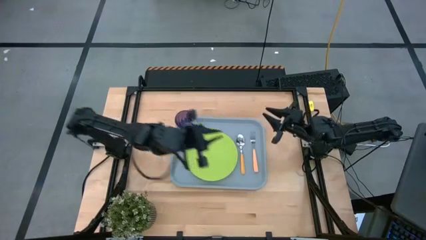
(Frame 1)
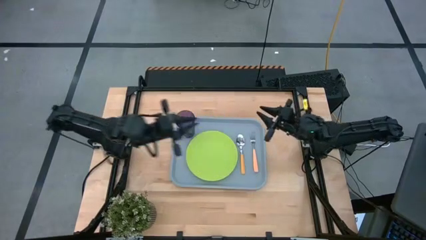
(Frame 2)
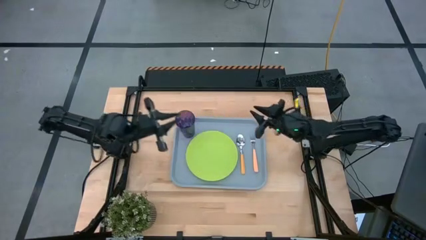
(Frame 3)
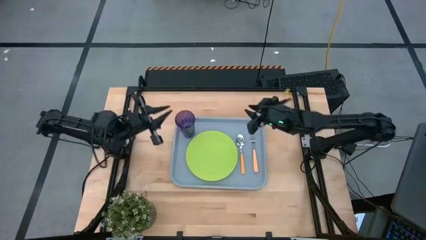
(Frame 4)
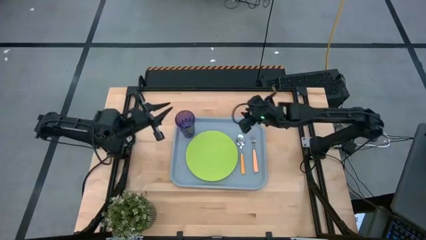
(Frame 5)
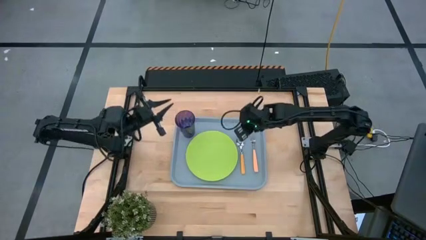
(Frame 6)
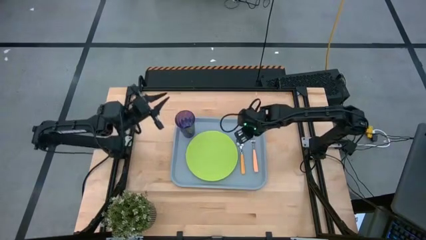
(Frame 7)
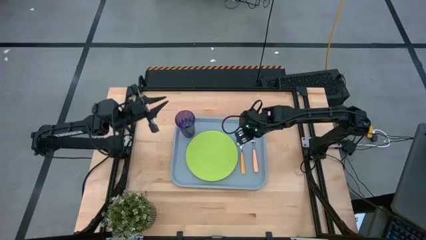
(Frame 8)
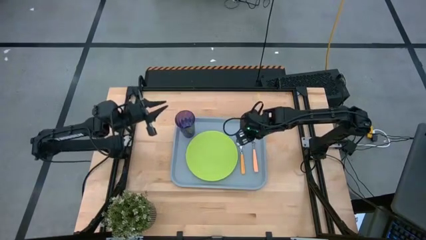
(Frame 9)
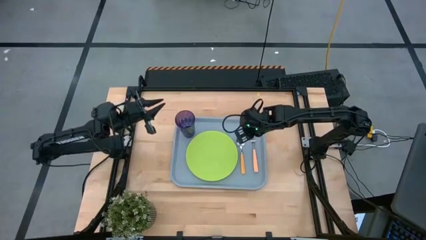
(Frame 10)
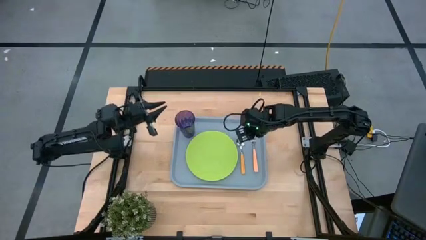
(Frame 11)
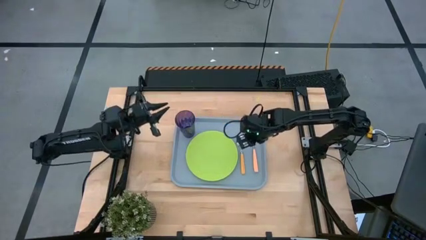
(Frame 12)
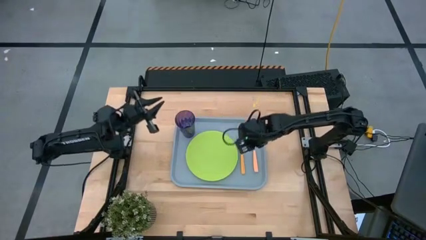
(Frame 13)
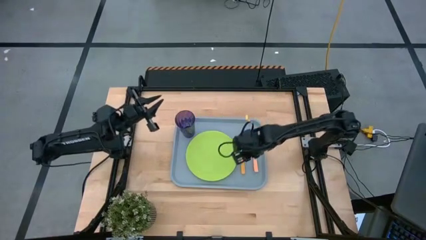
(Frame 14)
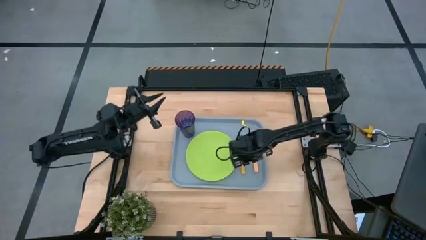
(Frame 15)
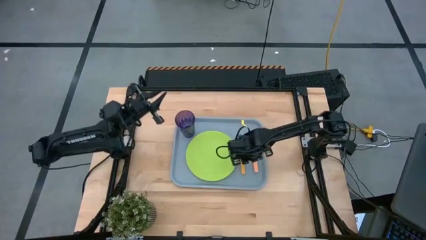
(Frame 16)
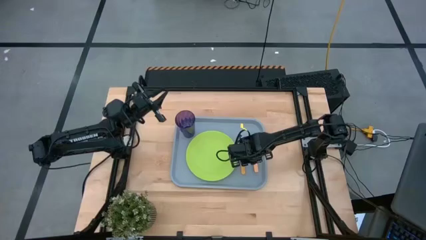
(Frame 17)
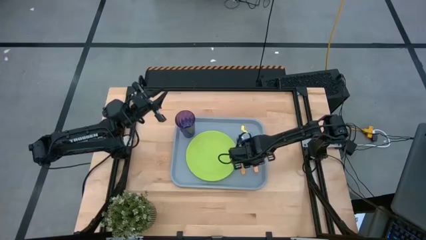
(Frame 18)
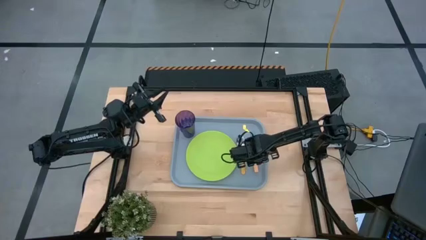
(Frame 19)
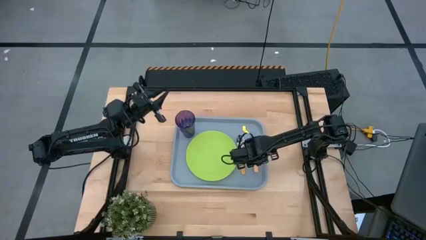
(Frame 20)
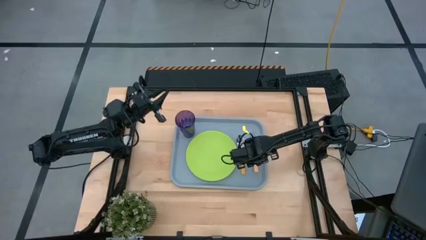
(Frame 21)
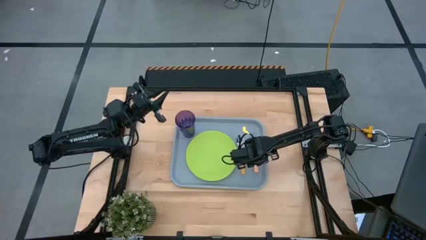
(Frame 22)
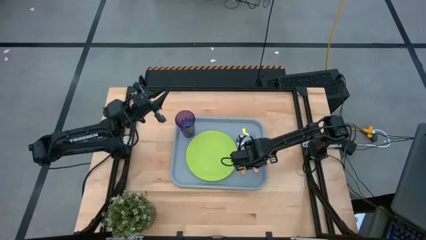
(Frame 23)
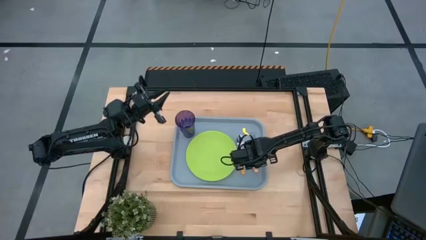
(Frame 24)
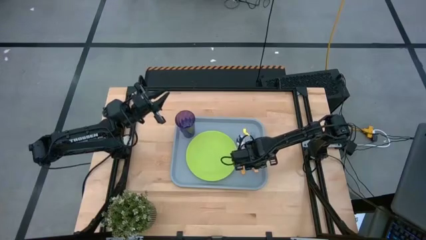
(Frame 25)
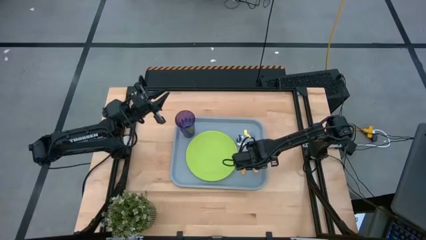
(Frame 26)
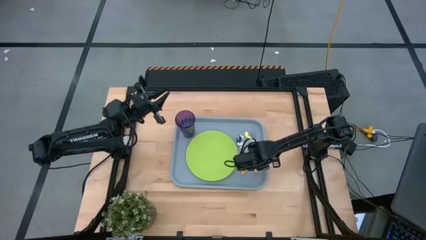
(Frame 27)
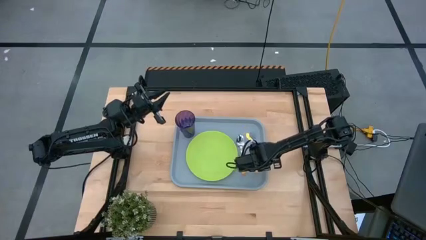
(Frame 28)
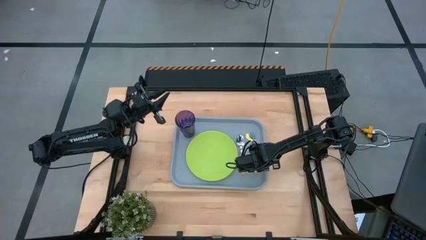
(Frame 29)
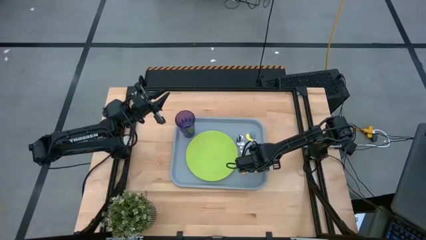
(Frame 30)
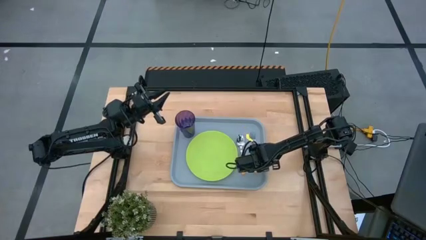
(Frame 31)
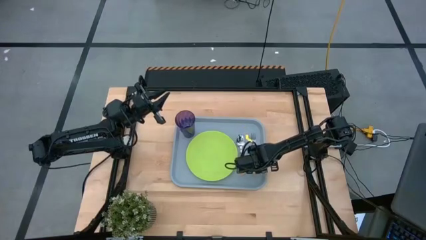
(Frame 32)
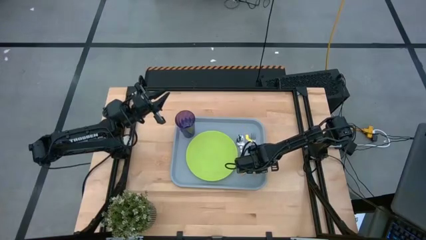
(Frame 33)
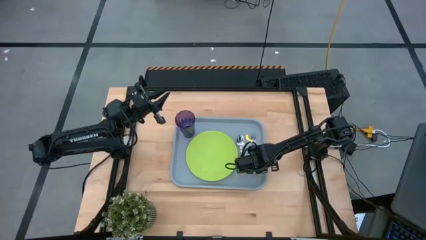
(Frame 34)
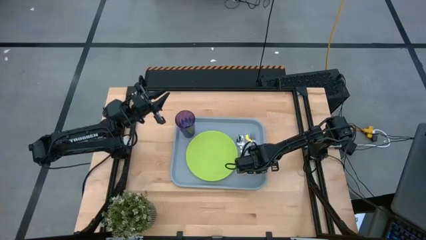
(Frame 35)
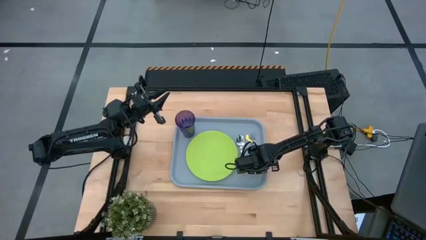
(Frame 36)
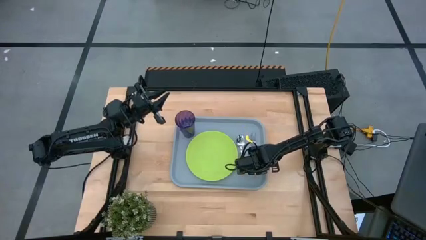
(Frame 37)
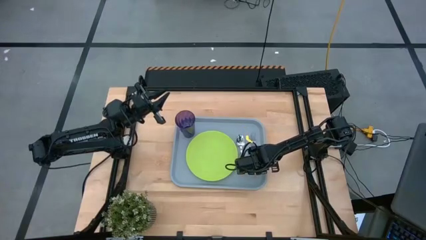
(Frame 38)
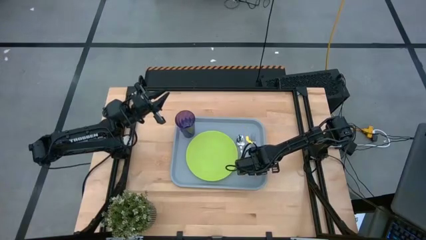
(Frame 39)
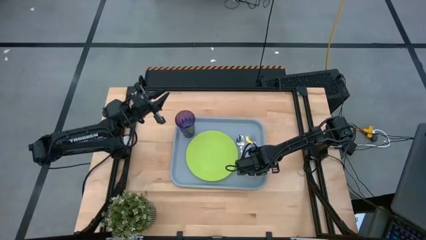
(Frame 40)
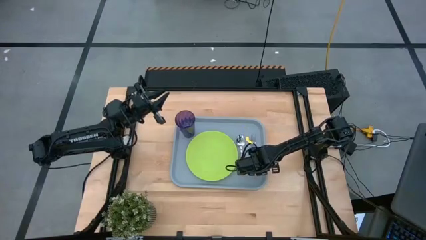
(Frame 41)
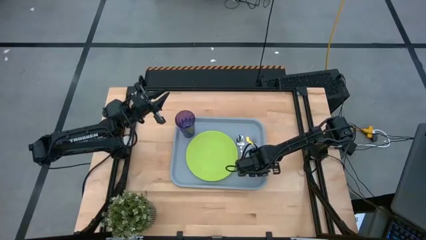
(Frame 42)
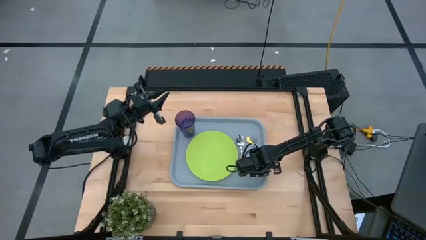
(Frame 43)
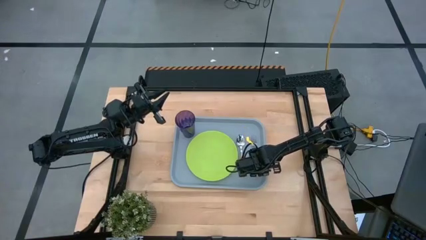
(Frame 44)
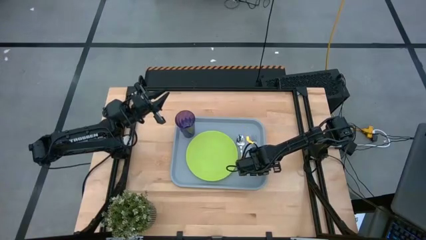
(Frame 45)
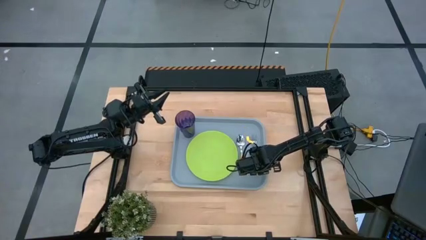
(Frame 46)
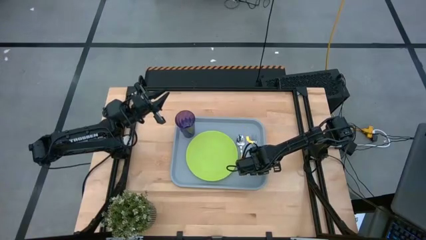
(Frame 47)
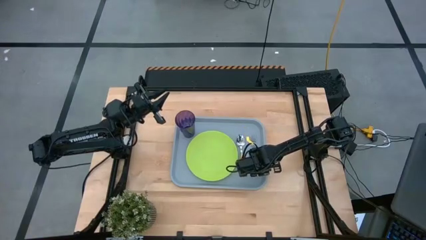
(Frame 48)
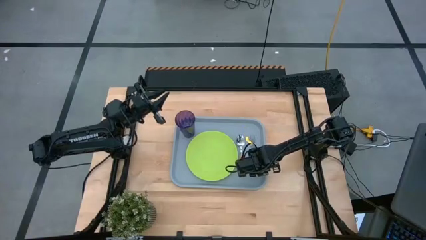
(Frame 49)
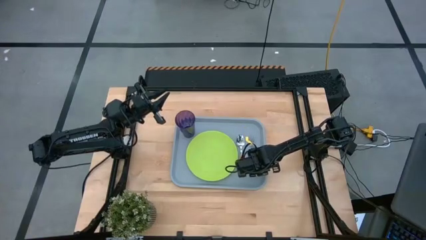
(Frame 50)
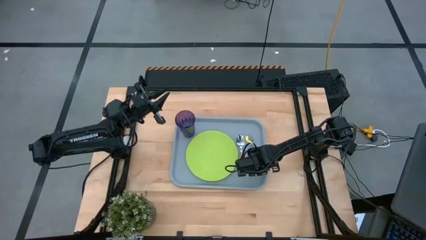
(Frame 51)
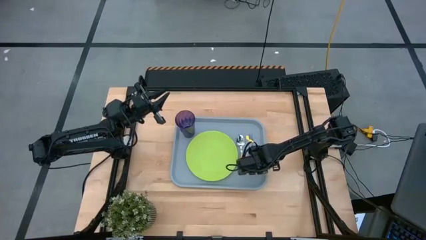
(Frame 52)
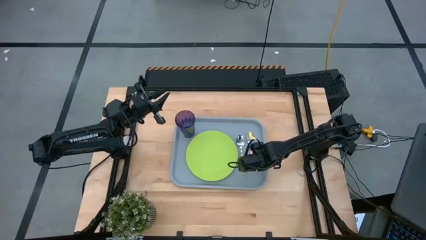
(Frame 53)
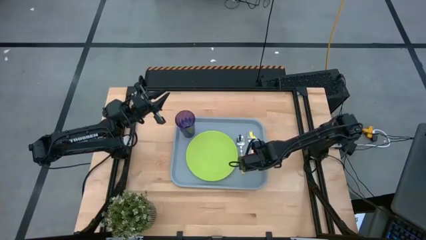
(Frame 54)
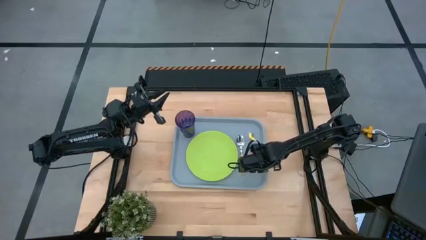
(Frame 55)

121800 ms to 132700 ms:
Task: Pick and place plate/cup/fork/spoon on tray
Put the orange fork on the gray serving tray to the right side of the orange spoon

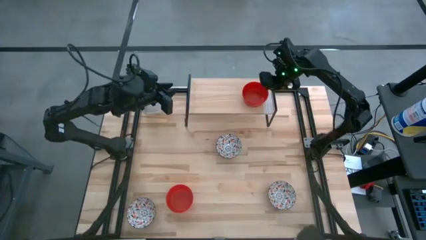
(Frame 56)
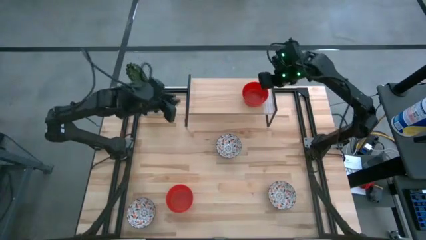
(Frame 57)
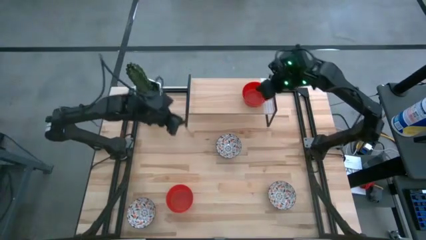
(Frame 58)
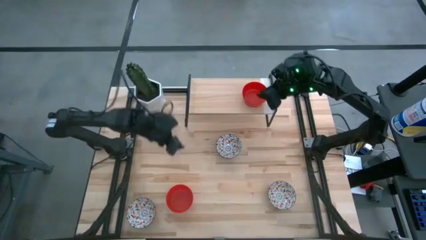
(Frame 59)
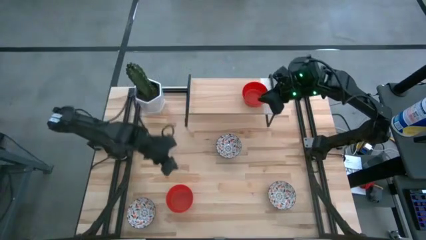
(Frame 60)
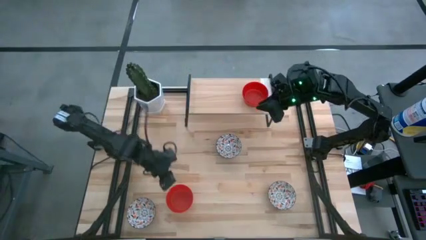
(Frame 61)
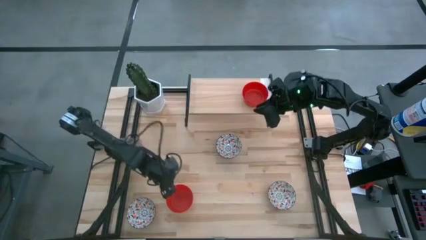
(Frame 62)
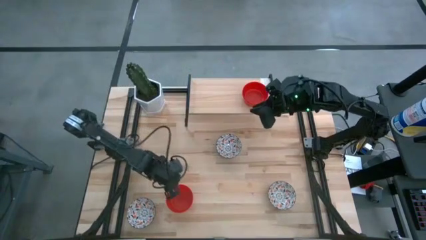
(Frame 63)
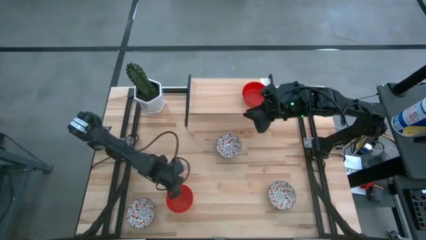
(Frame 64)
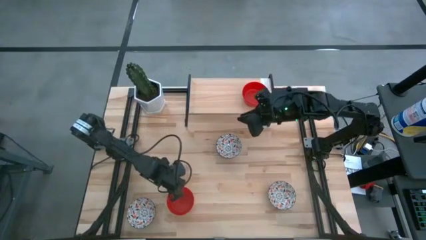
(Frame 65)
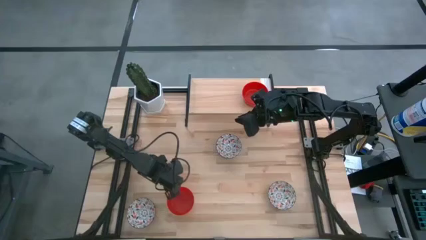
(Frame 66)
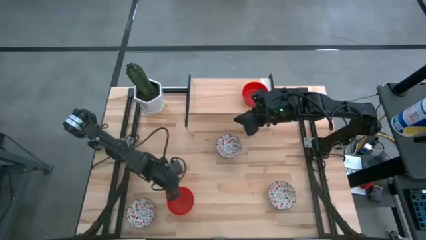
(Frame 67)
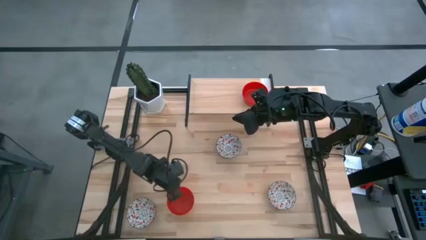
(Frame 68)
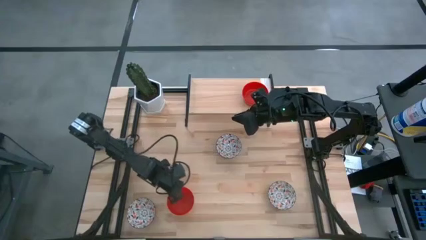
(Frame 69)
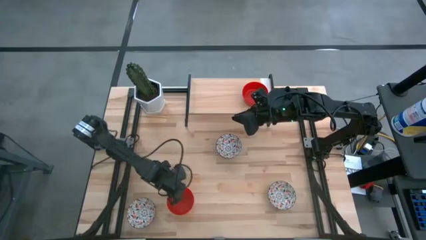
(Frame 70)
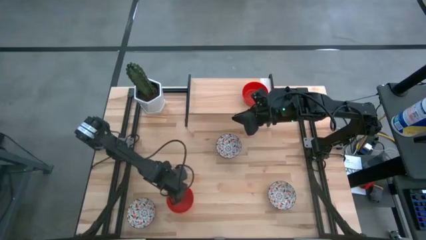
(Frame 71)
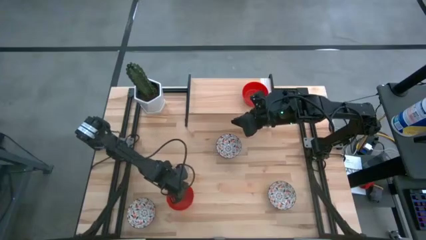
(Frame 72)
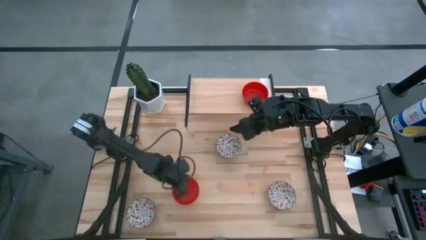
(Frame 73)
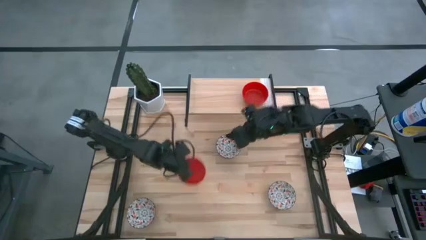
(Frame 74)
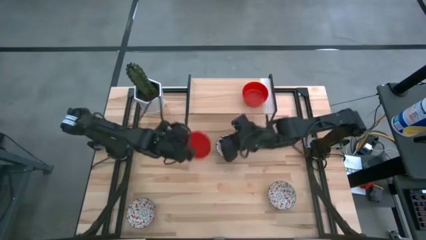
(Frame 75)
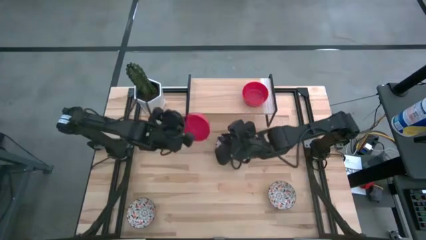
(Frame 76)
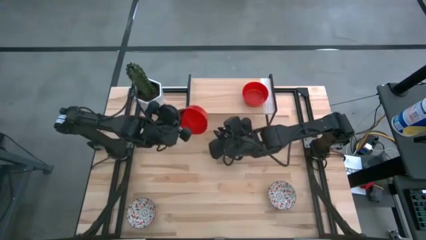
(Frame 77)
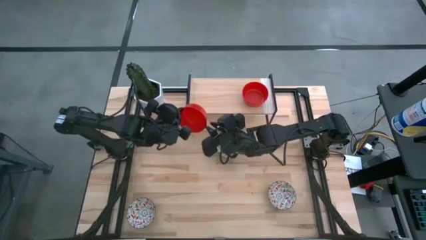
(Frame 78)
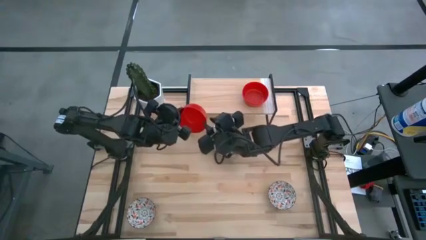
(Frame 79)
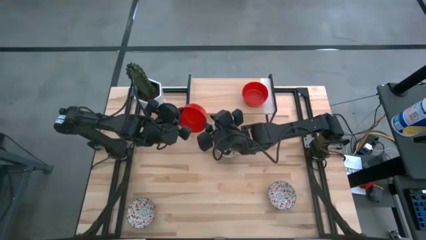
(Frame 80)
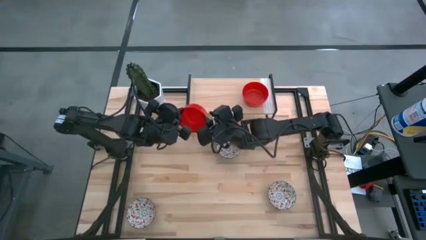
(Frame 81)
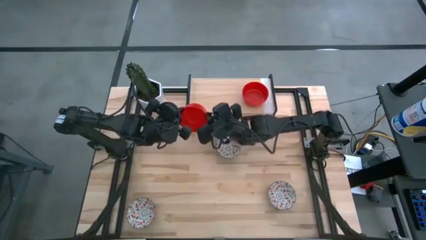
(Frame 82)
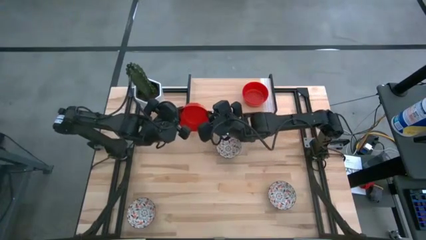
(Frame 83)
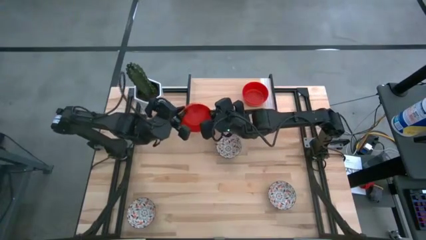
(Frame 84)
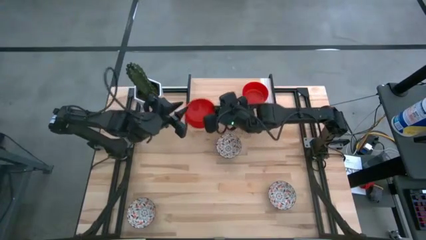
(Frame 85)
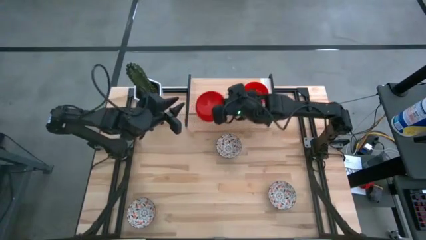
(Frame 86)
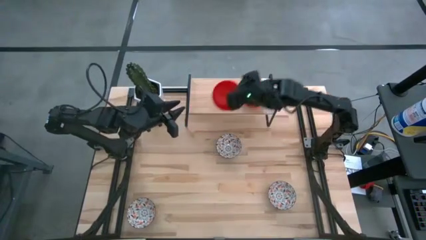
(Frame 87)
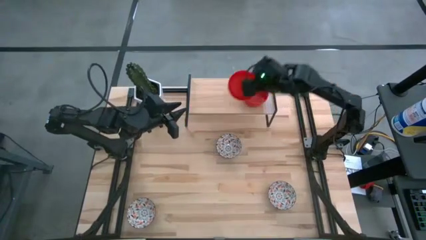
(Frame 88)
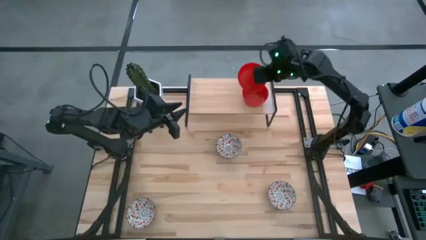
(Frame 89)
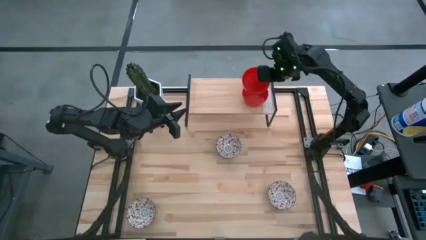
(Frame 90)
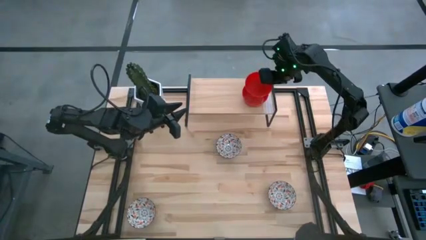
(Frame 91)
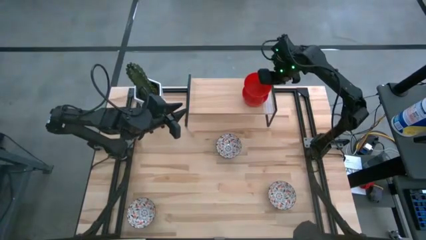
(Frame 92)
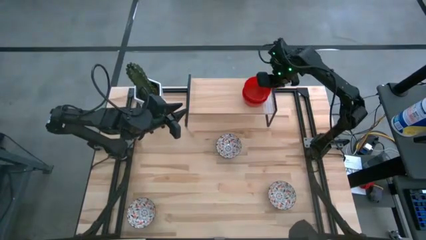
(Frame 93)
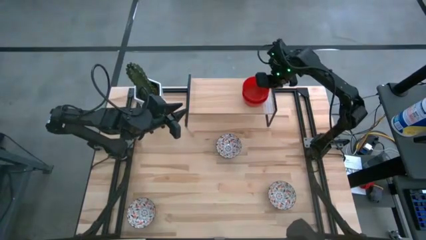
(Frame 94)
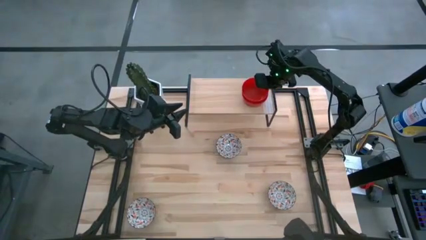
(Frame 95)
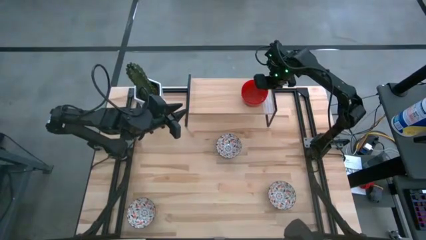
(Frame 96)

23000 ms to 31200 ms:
Task: Pick & Place Mini bowls
Stack the red bowl on the red bowl on the shelf
